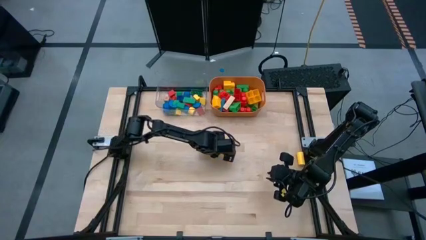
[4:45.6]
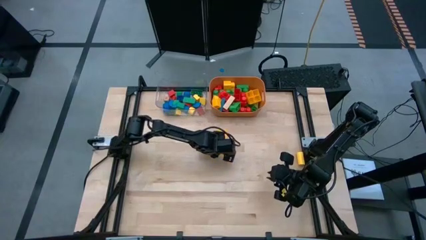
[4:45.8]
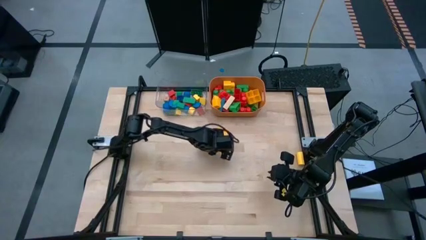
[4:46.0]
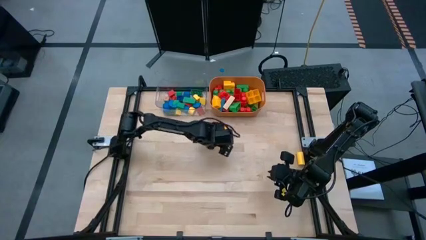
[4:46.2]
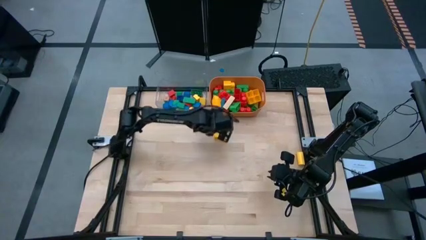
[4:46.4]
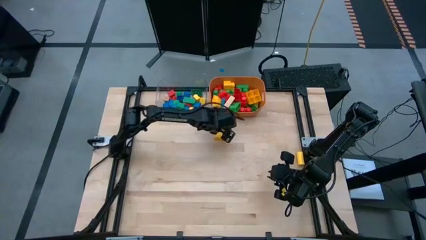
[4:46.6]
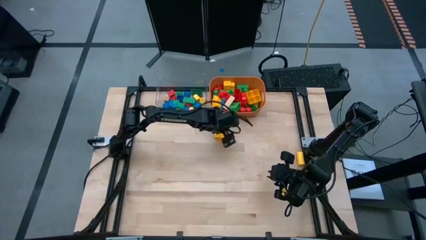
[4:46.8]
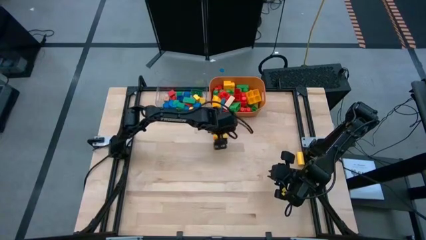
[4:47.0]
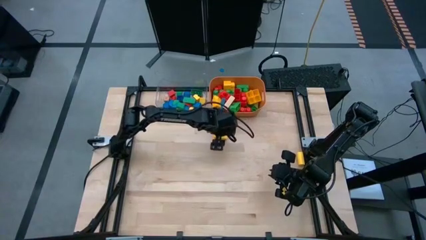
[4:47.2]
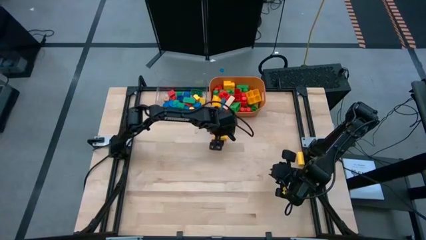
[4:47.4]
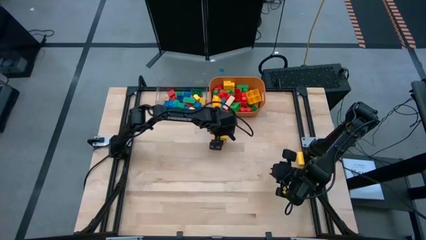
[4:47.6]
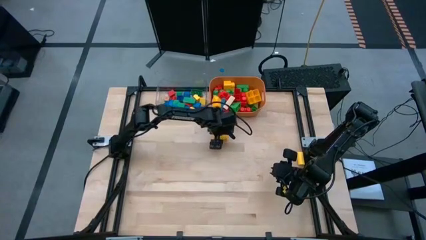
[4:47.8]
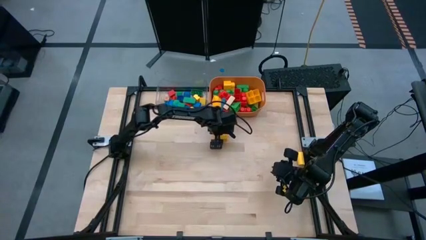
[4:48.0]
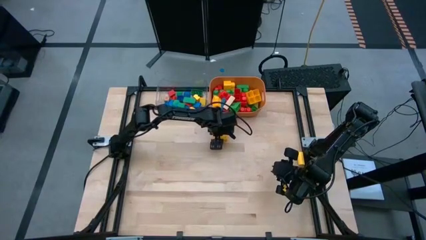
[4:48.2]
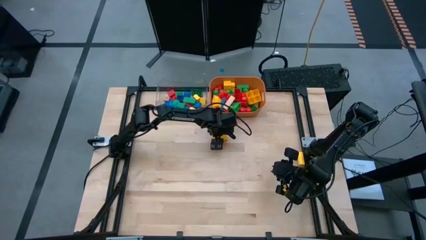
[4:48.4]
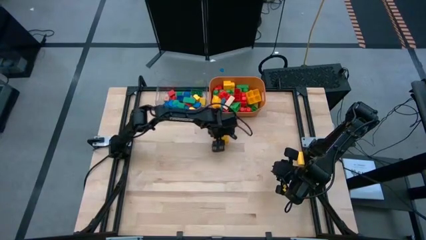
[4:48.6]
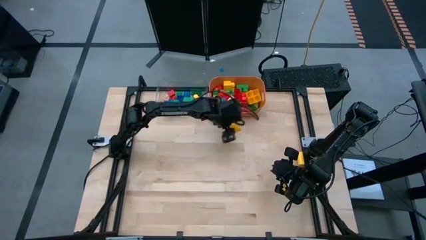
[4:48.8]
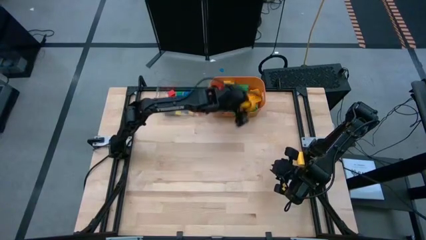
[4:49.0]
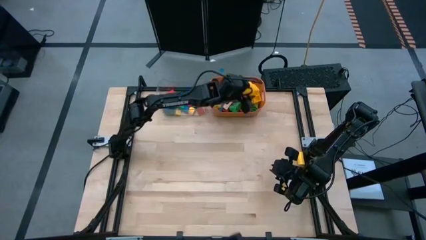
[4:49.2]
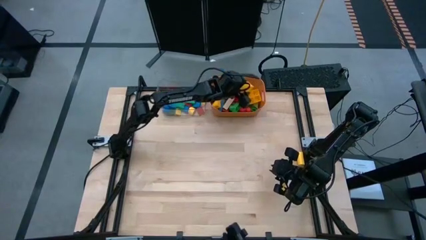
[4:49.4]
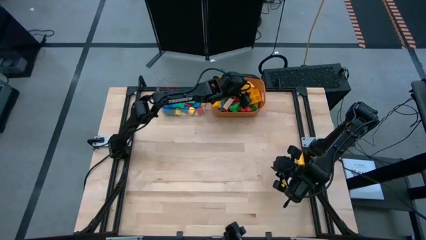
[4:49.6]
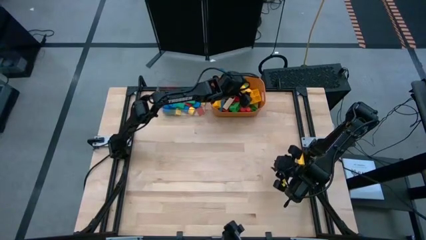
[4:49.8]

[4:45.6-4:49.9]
Task: Sort blocks by size
Put the big yellow game piece into the orange bin

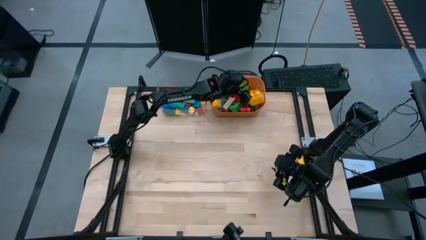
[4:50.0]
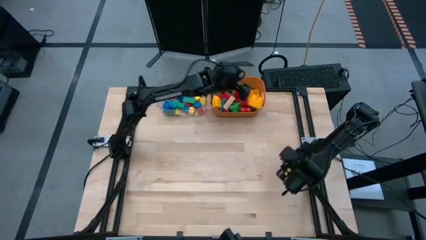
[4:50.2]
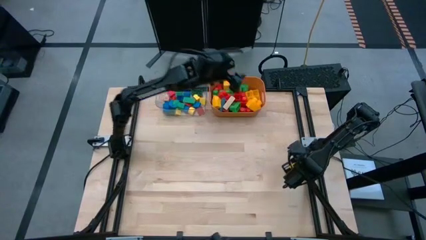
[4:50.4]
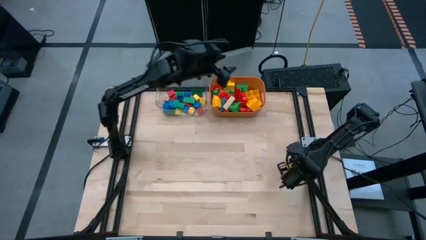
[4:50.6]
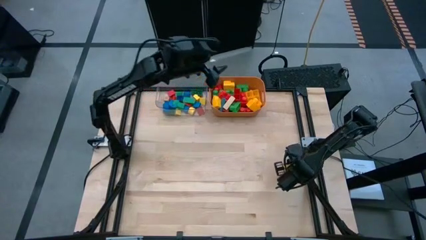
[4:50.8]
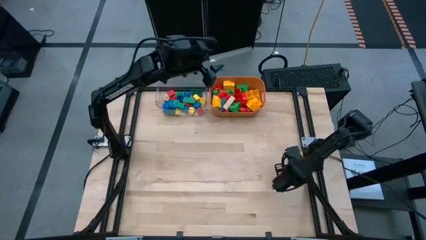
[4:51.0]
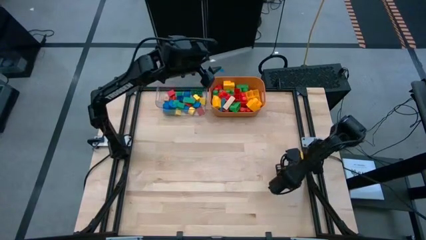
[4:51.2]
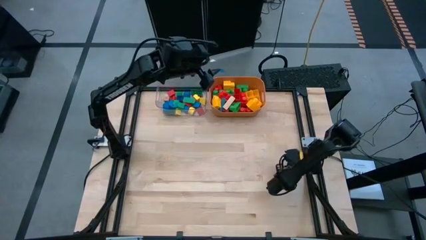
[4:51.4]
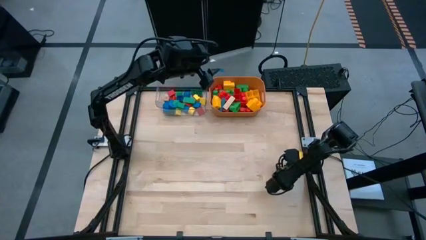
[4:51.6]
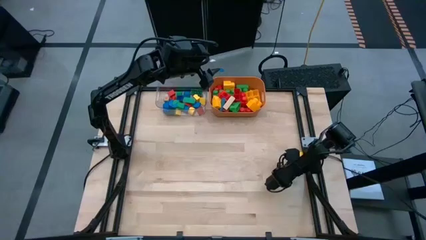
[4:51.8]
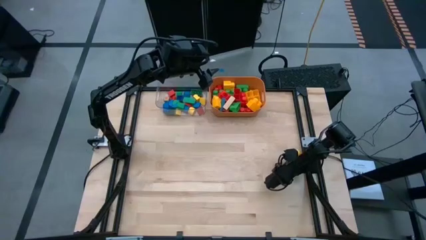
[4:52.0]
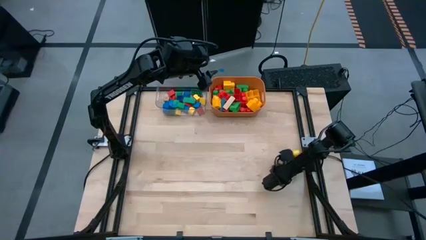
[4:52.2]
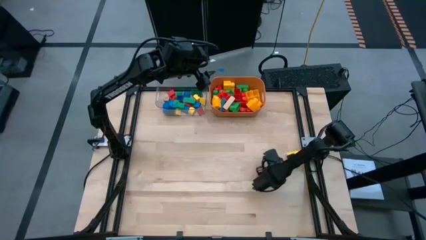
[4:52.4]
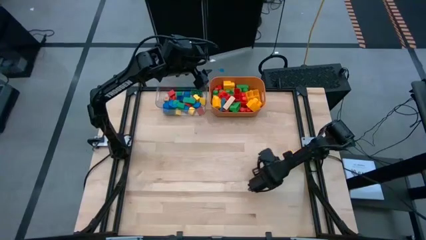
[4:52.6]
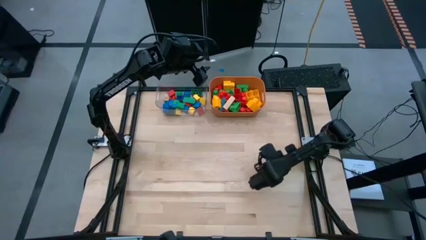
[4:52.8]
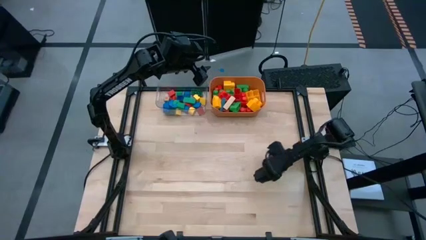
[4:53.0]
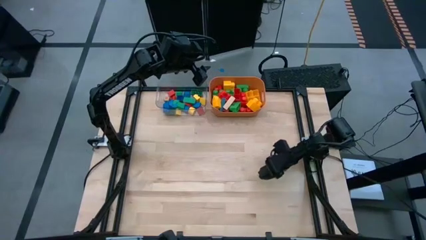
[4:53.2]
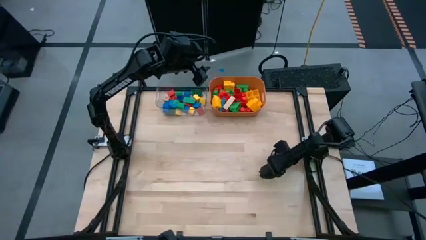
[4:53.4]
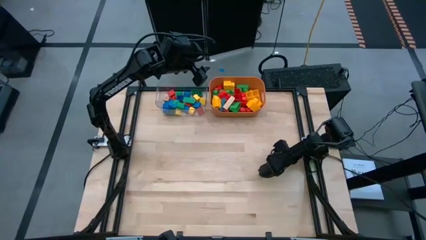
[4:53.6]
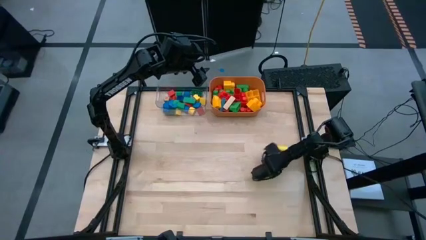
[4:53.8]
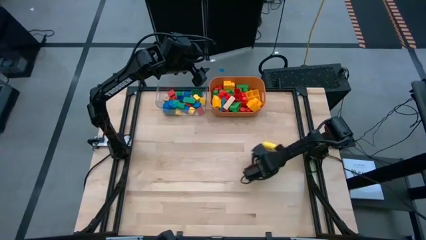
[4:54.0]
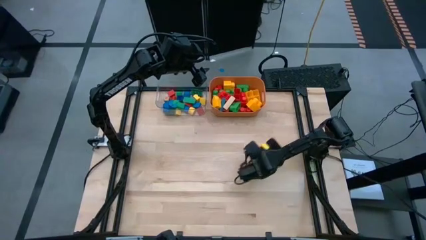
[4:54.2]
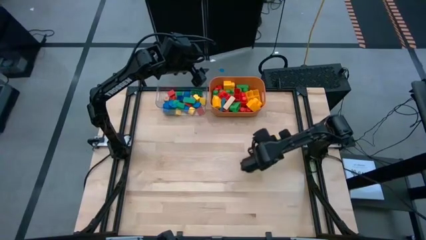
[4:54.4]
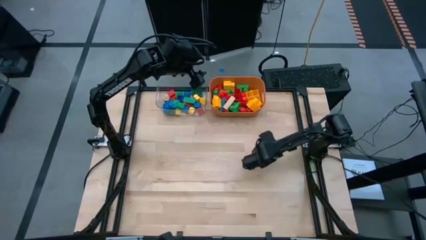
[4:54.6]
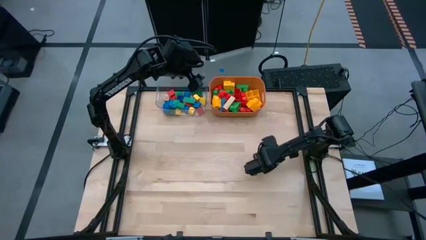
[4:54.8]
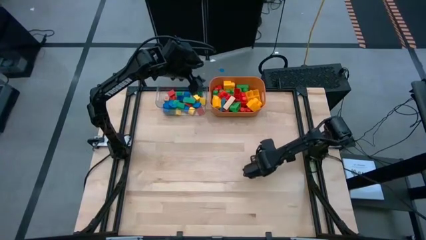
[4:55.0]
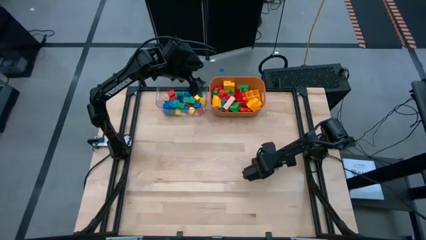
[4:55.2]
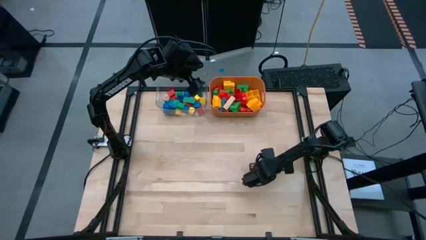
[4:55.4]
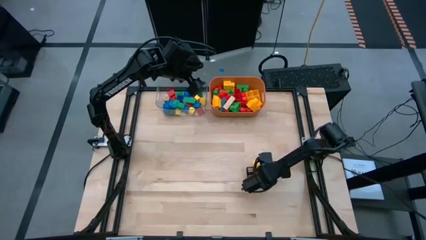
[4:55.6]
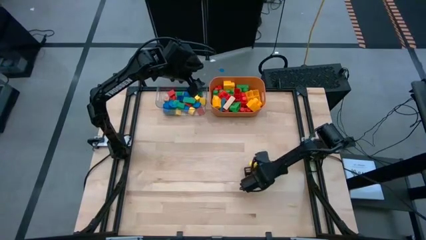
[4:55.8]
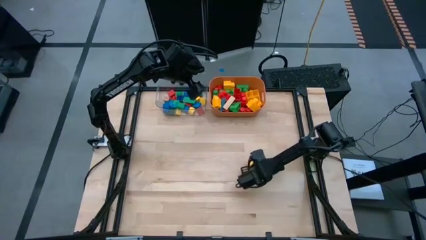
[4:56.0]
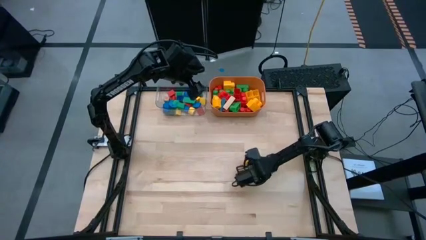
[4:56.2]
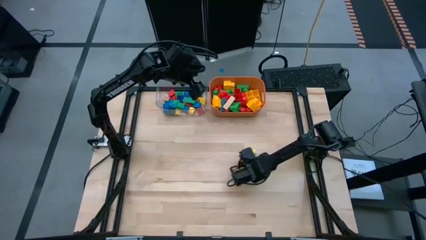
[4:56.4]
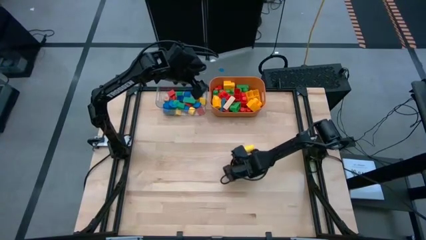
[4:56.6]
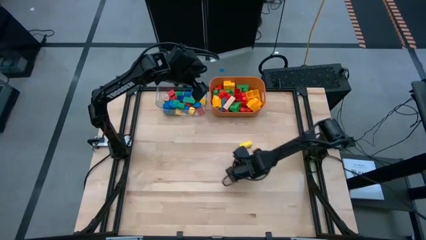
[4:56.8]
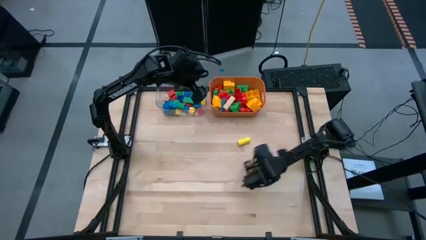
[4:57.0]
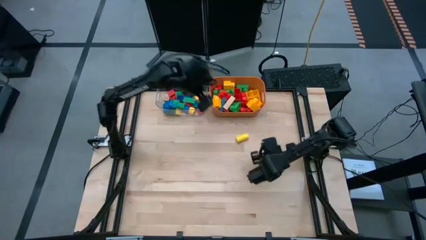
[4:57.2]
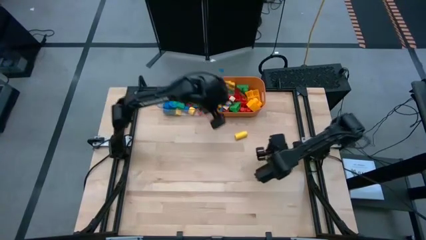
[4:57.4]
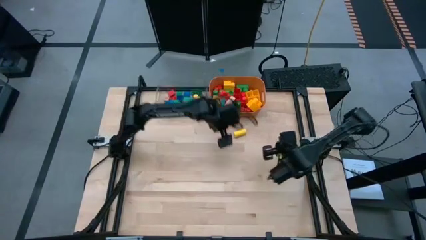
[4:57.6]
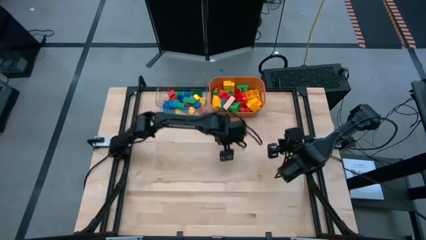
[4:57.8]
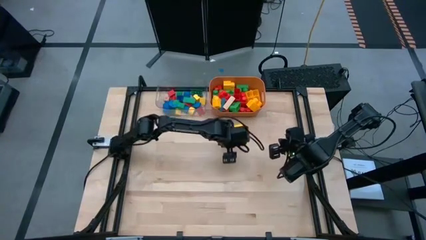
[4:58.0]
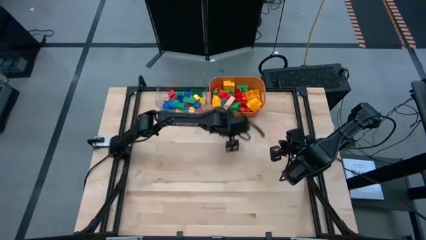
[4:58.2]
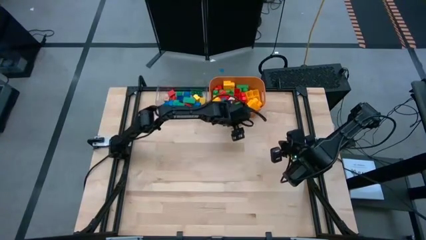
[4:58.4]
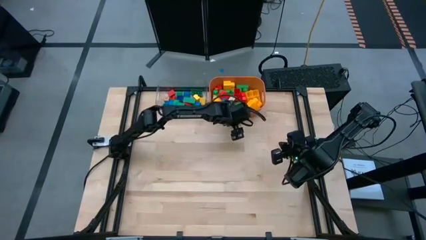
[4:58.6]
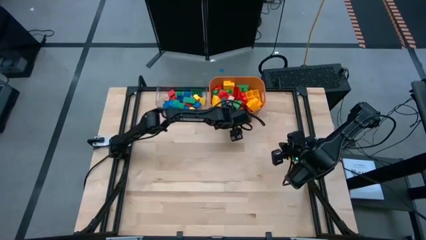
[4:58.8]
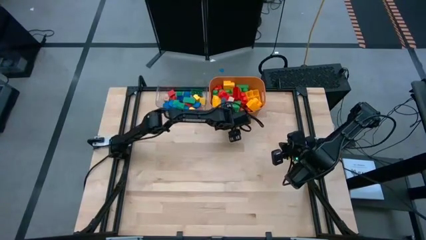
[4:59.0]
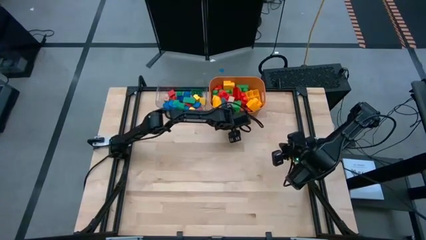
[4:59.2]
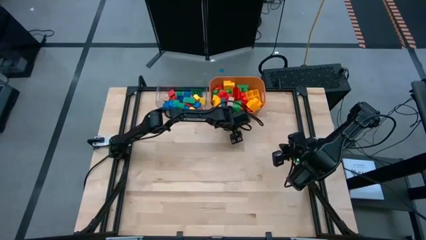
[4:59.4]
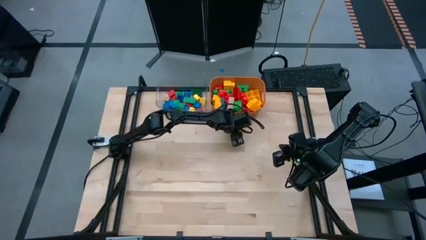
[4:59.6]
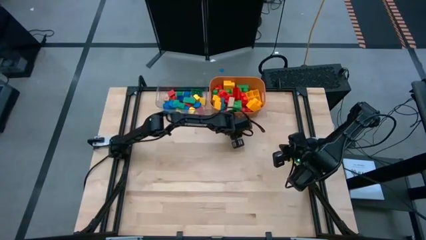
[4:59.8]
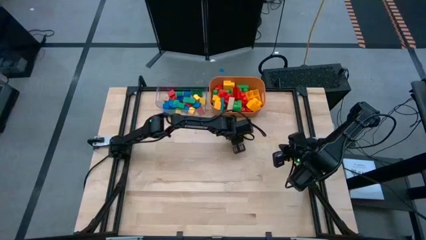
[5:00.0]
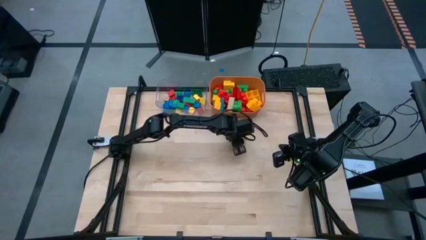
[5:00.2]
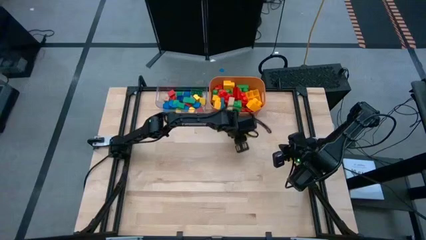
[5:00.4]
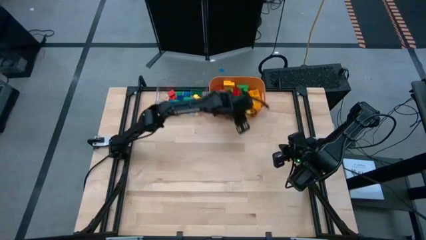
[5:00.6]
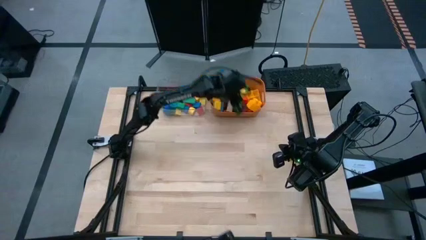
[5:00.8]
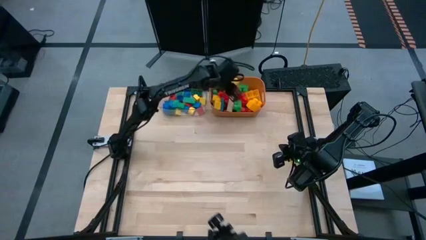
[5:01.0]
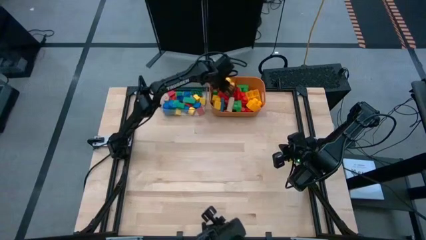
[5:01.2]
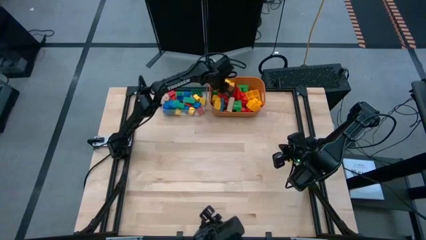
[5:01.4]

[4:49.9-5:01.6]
Put the big yellow block into the orange bin
